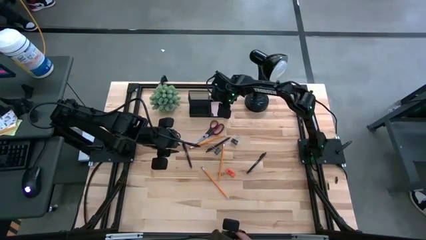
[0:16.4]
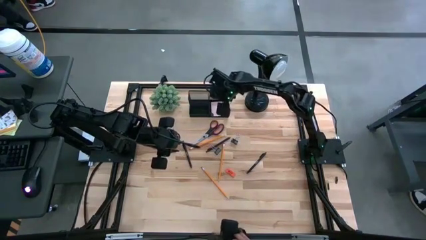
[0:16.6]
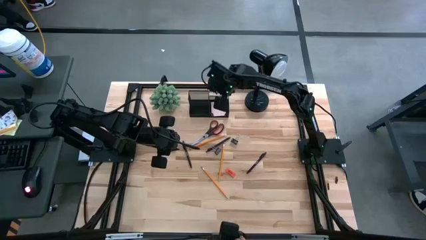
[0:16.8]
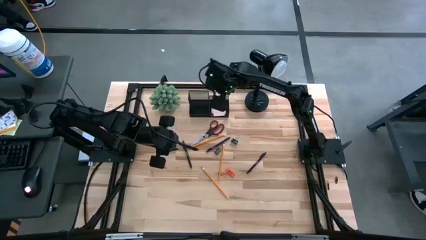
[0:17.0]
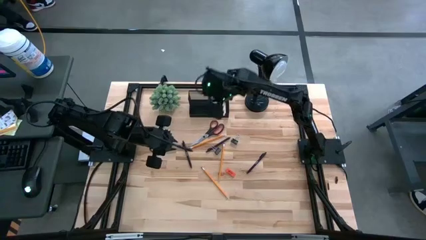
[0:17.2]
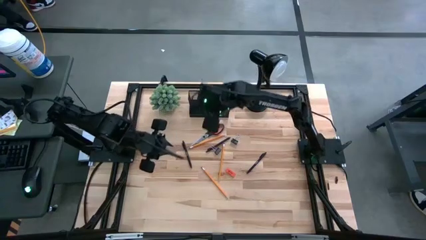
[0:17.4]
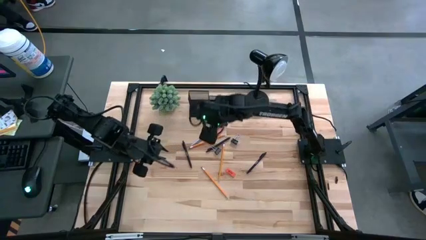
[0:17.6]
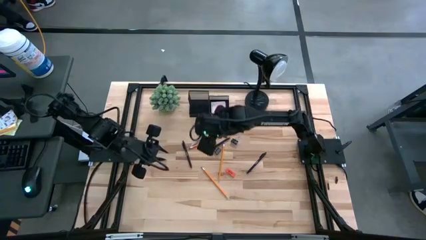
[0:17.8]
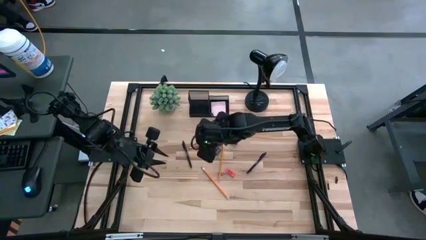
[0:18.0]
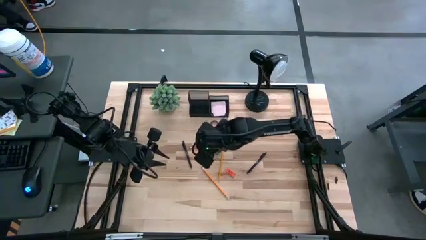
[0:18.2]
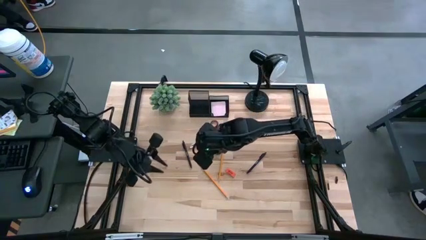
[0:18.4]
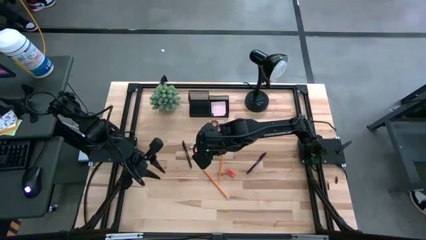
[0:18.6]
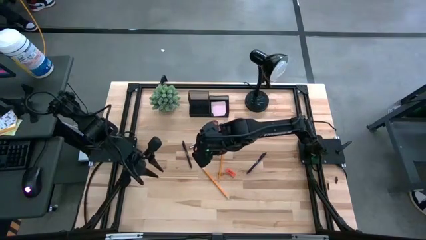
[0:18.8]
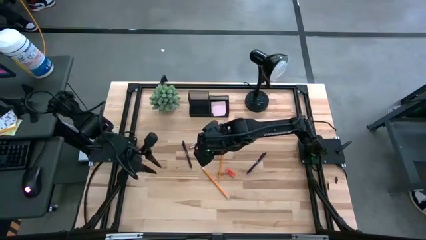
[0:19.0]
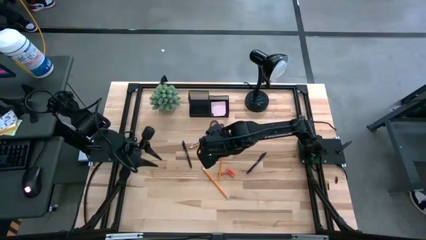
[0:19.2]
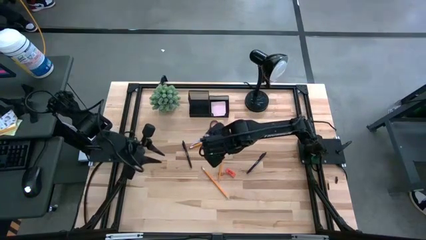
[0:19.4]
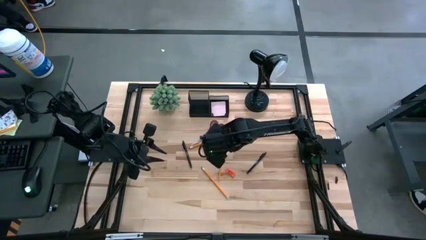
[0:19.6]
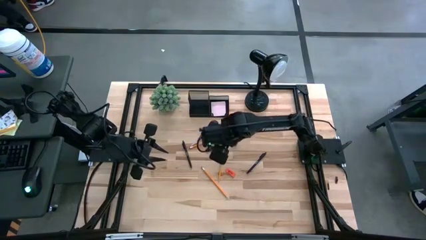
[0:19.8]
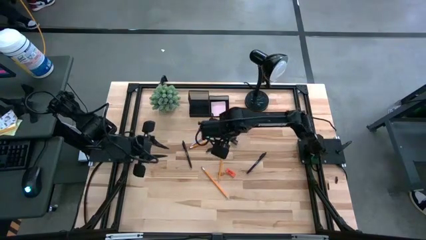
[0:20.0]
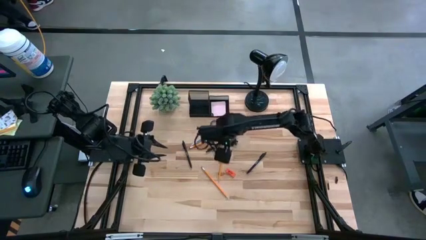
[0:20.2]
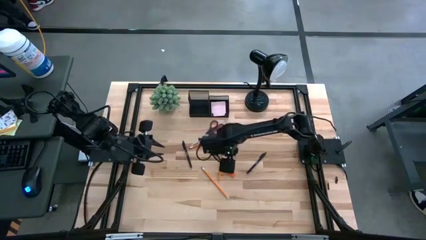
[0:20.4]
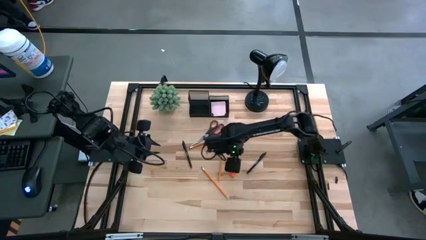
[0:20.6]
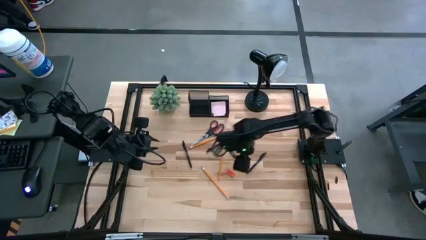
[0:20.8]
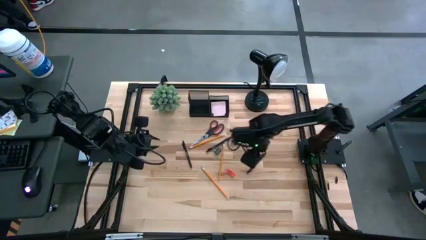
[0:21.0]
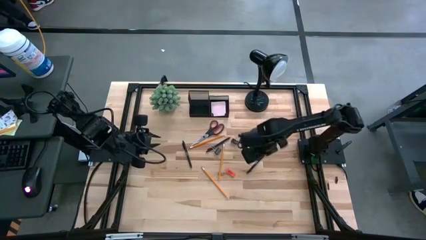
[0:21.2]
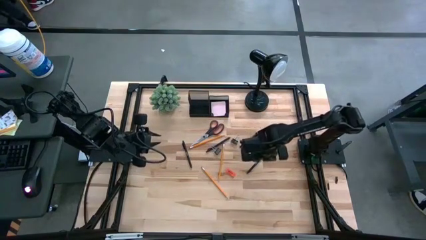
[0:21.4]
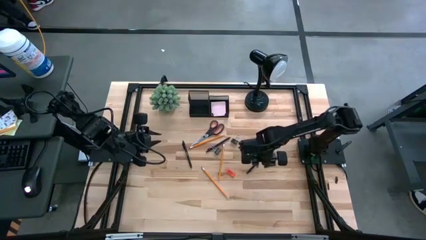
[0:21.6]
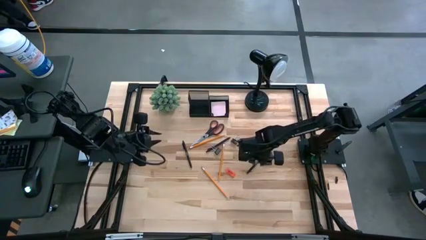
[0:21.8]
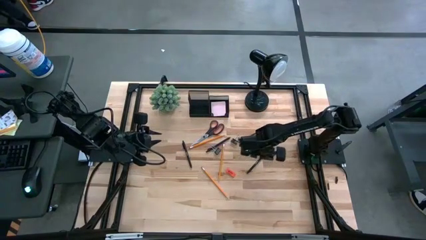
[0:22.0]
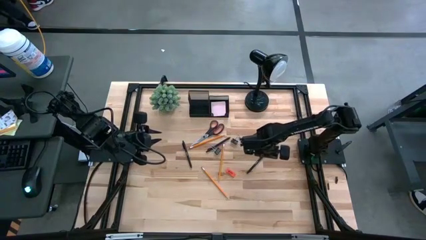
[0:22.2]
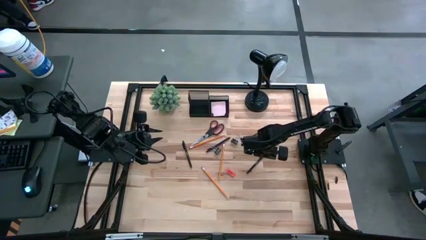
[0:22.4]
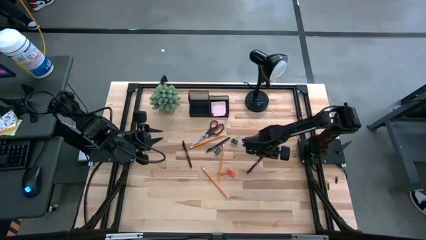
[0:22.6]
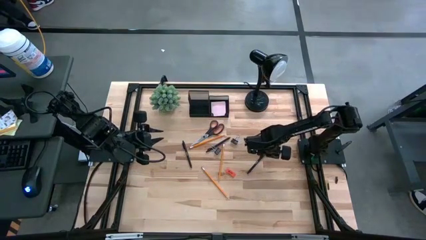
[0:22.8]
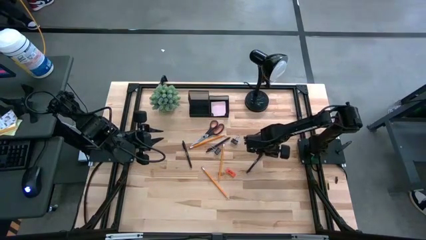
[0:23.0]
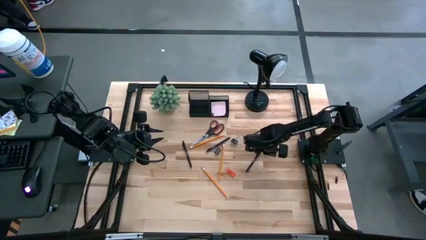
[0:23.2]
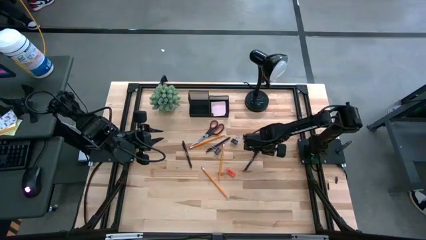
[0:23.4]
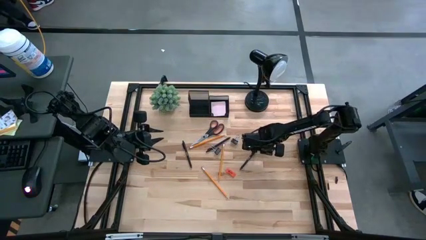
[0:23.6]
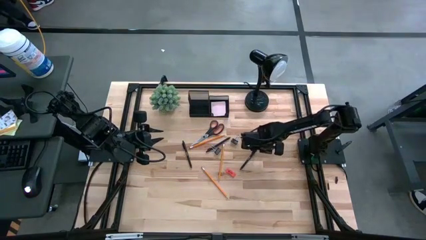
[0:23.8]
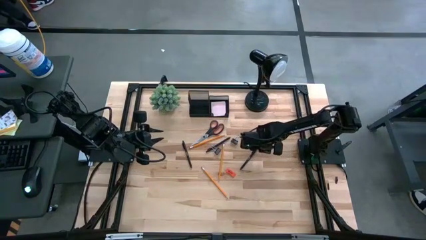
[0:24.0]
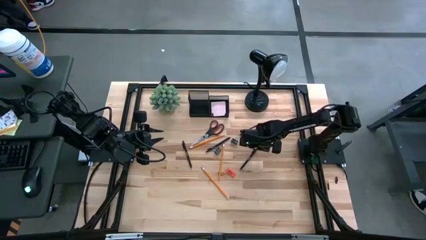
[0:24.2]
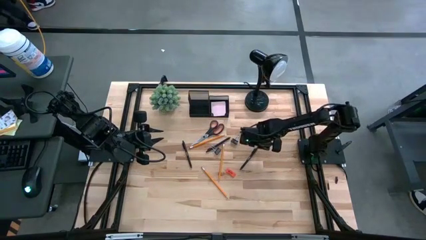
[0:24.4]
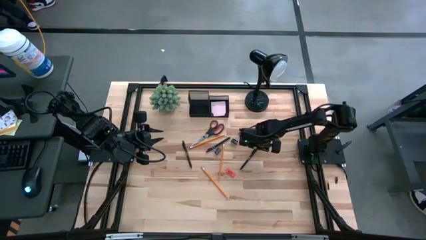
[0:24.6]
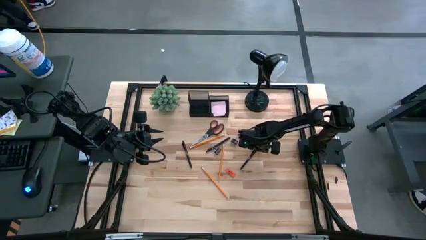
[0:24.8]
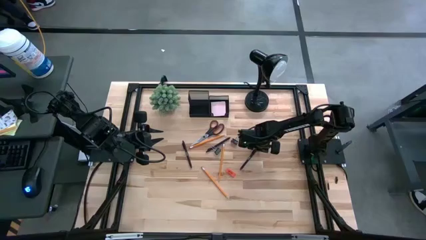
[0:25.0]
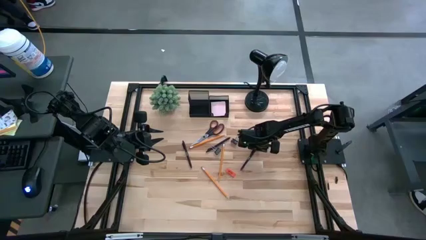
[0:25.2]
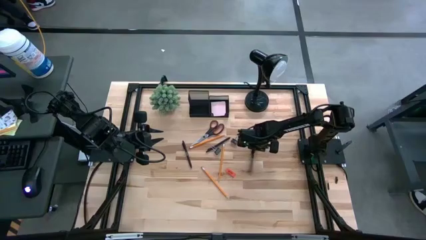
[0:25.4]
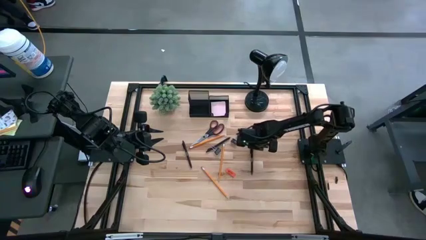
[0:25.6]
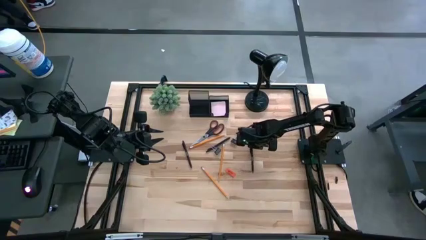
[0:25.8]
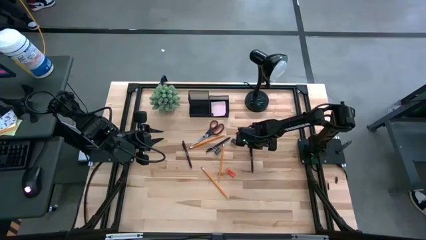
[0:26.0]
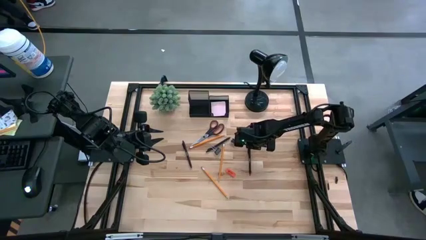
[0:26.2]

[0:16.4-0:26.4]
Task: Pick and place office supplies into organizer
Put the right black pen into the black desk organizer

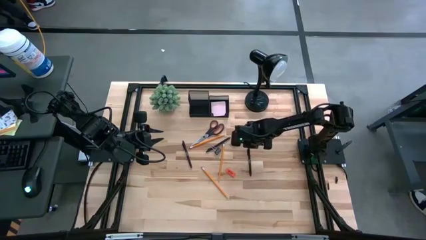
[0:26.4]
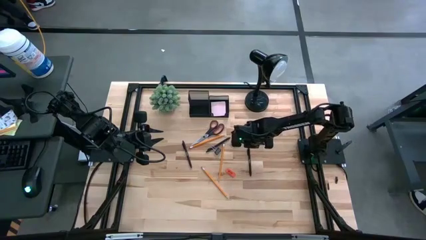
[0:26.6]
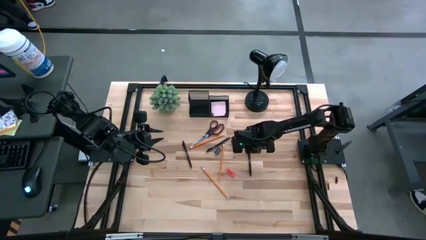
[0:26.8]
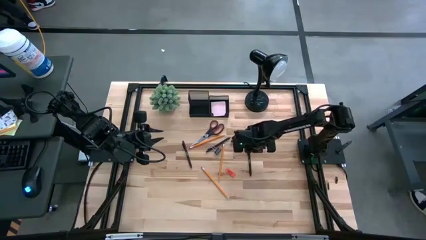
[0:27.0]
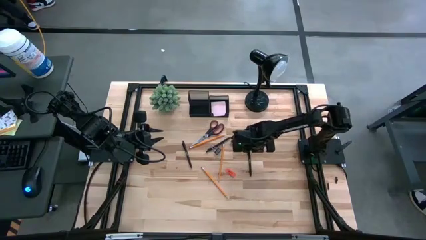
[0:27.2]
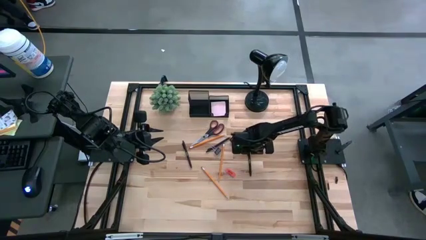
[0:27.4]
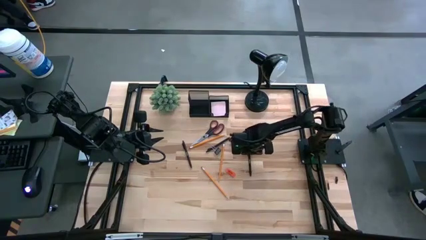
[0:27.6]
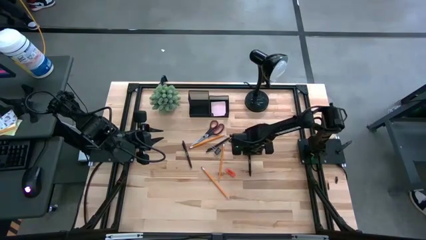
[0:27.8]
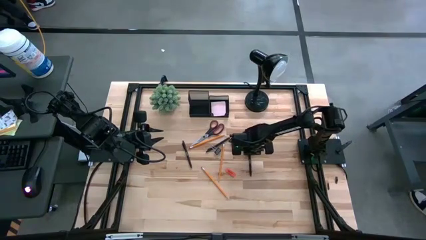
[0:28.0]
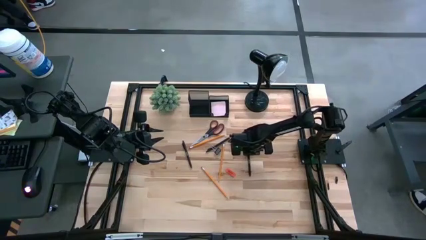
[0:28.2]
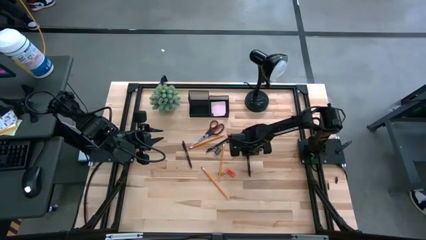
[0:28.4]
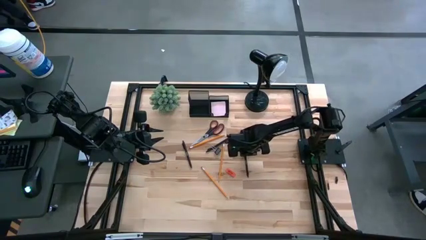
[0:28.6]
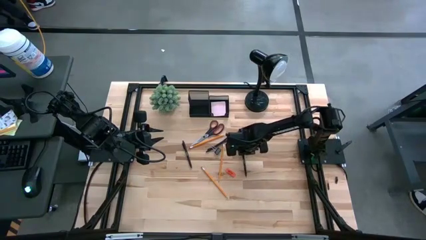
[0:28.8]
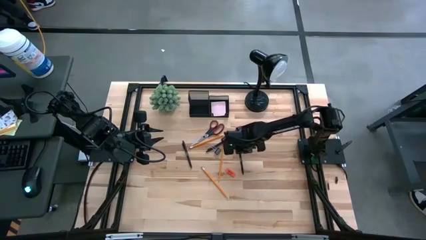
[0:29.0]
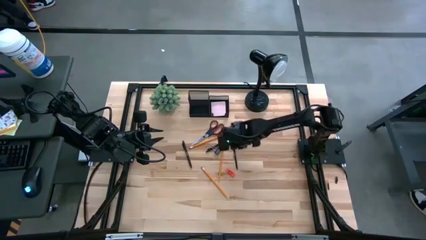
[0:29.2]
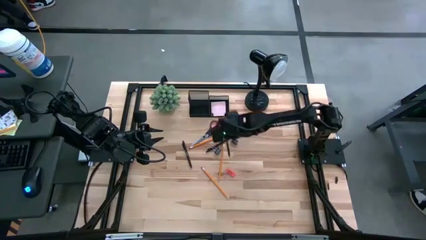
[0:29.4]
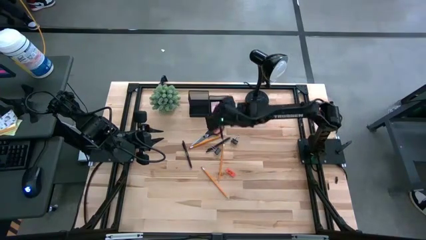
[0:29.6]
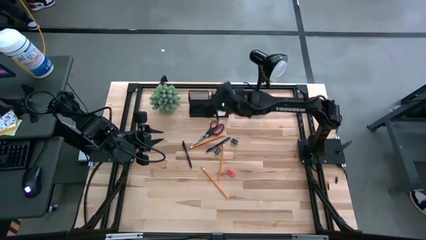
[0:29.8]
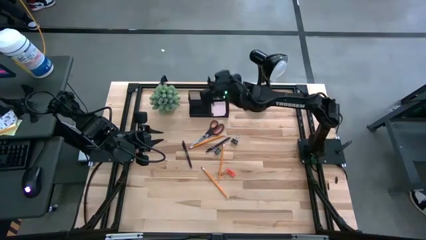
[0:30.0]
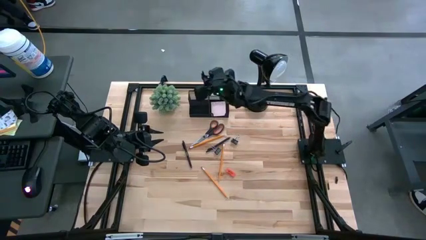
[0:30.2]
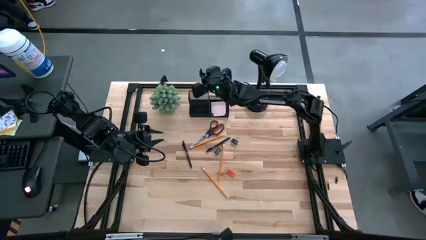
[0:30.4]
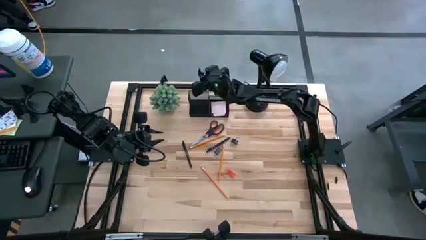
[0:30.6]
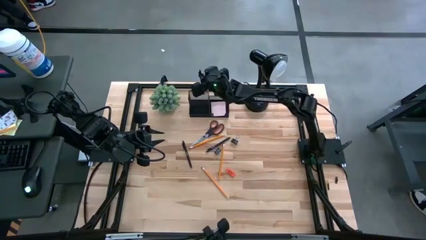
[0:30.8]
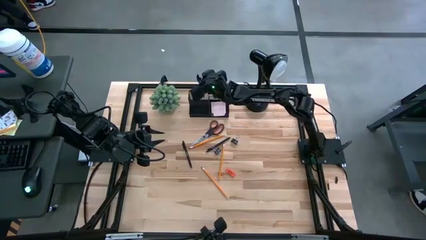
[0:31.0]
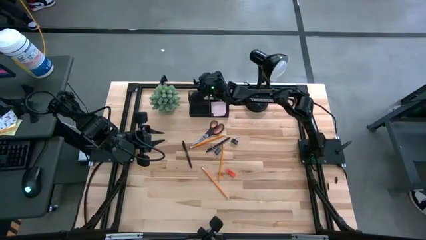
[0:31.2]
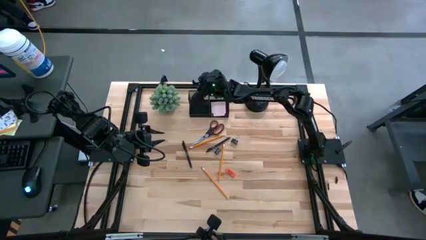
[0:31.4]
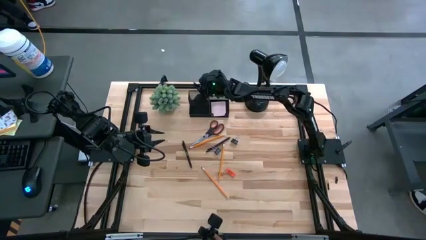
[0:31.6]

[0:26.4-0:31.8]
Put the right black pen into the black desk organizer
